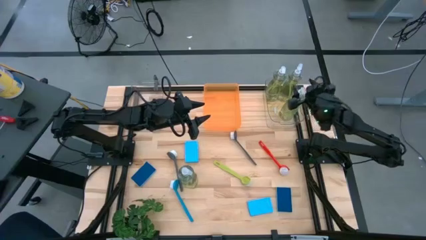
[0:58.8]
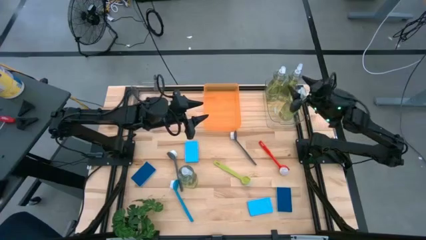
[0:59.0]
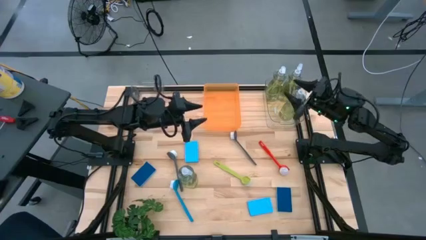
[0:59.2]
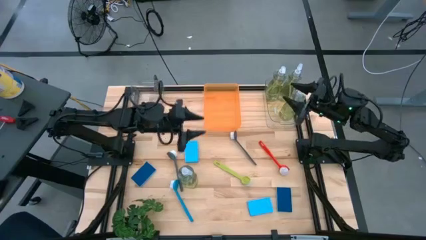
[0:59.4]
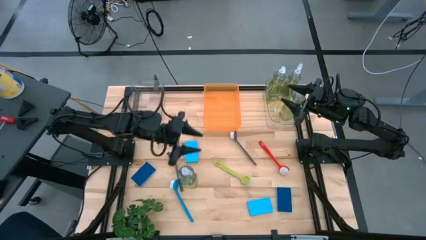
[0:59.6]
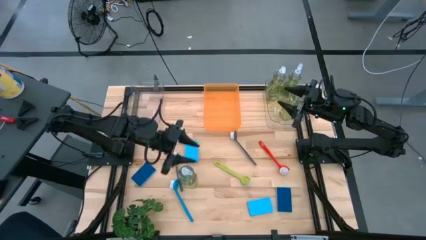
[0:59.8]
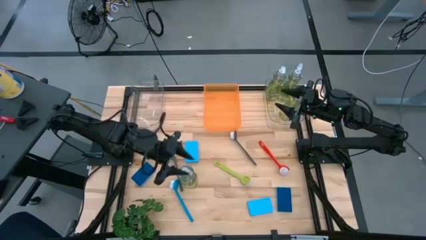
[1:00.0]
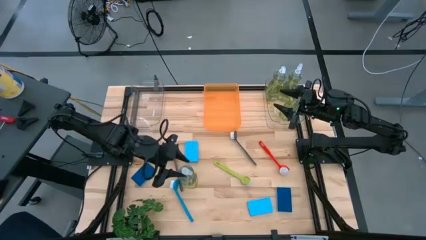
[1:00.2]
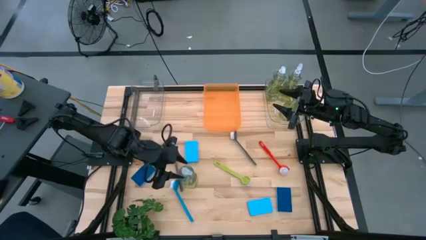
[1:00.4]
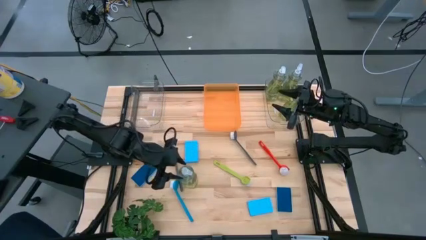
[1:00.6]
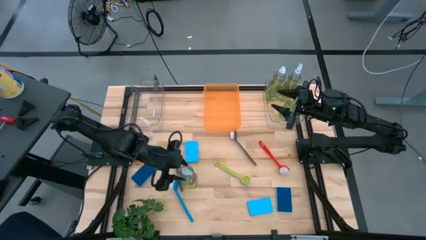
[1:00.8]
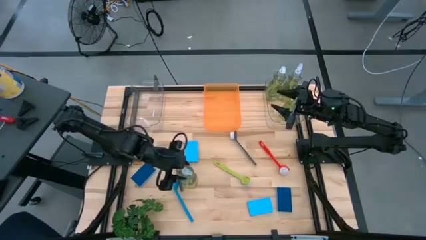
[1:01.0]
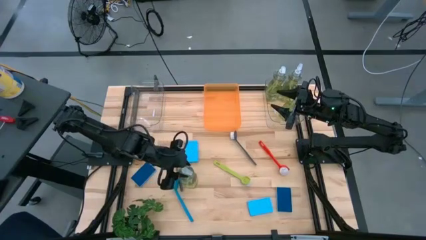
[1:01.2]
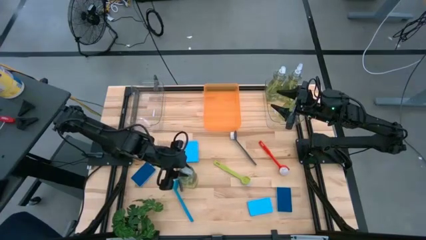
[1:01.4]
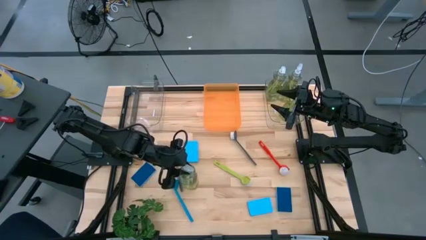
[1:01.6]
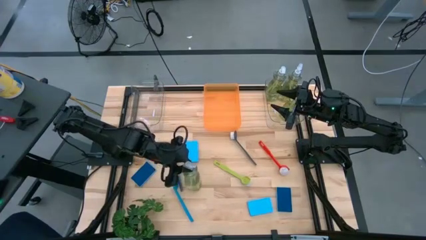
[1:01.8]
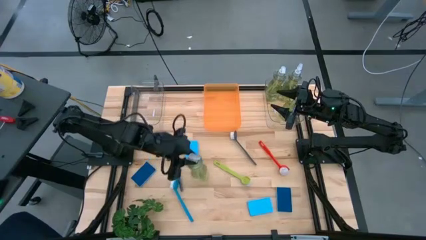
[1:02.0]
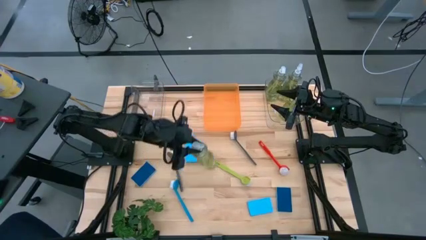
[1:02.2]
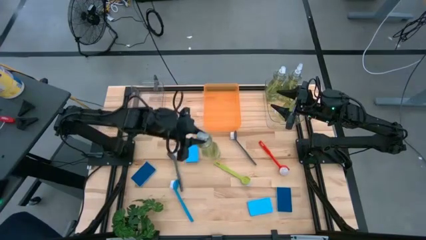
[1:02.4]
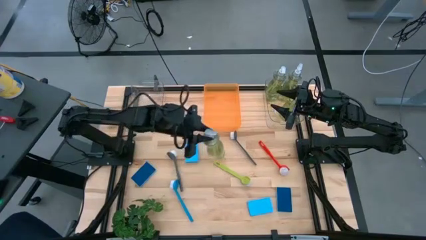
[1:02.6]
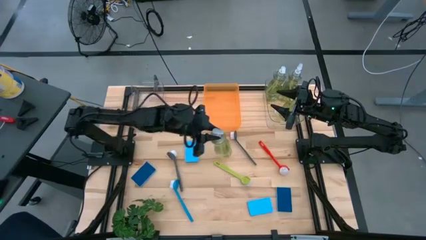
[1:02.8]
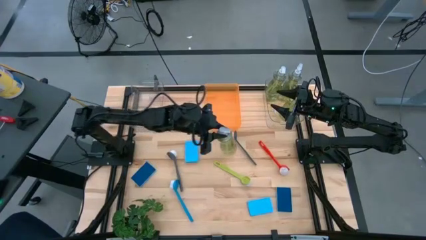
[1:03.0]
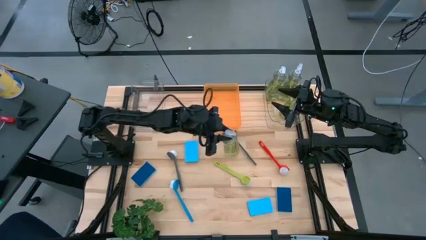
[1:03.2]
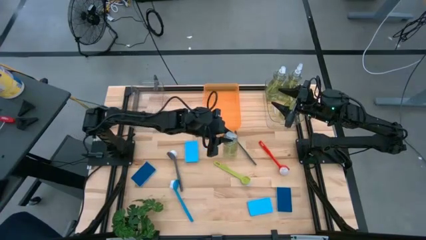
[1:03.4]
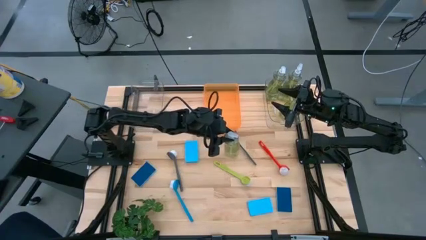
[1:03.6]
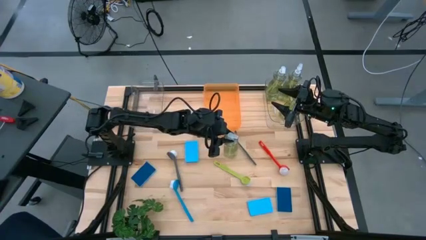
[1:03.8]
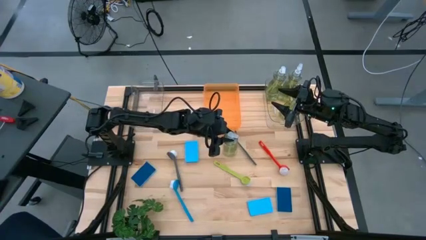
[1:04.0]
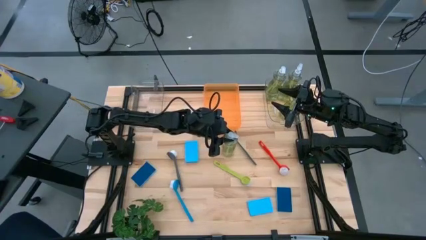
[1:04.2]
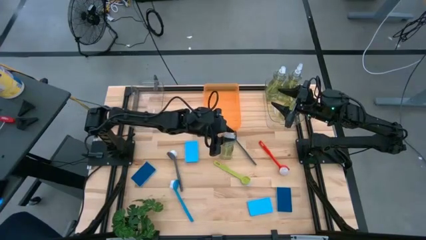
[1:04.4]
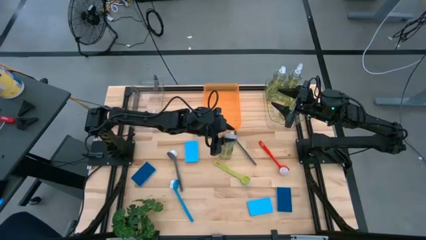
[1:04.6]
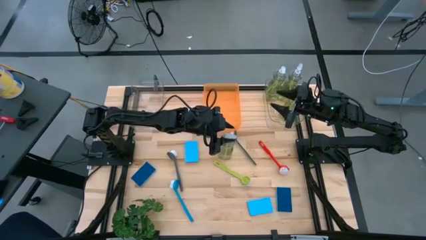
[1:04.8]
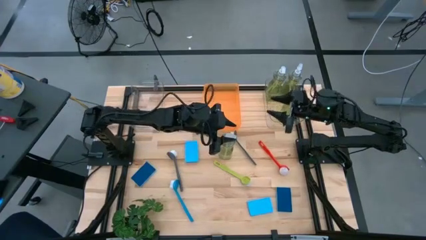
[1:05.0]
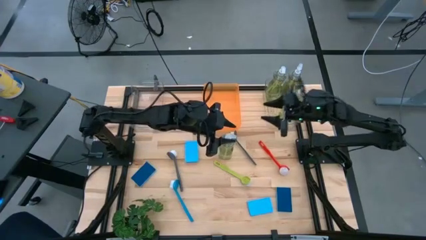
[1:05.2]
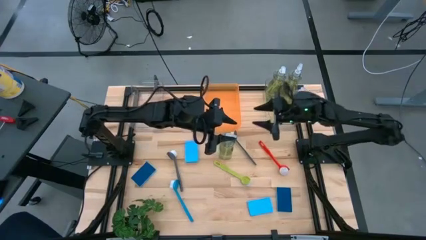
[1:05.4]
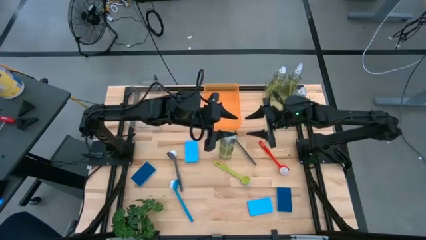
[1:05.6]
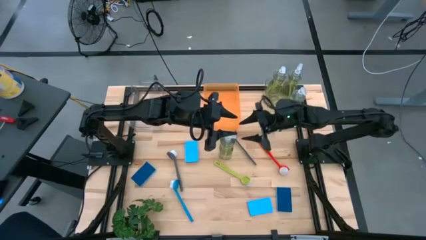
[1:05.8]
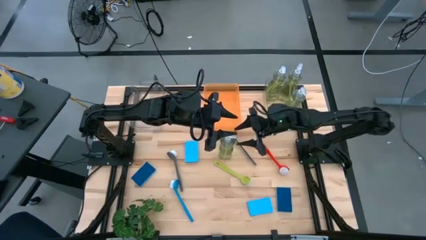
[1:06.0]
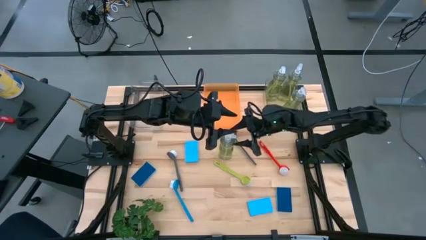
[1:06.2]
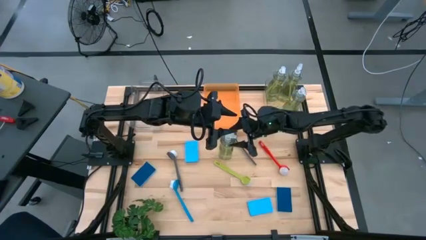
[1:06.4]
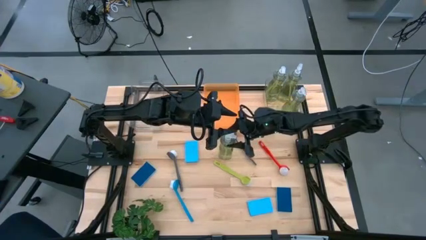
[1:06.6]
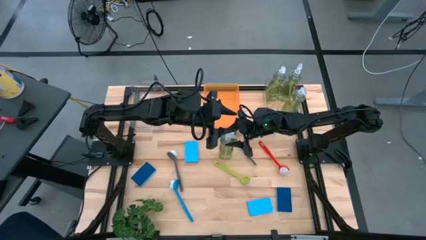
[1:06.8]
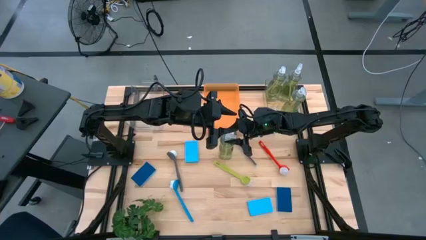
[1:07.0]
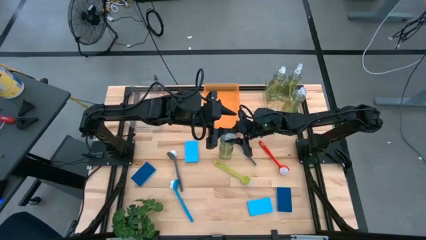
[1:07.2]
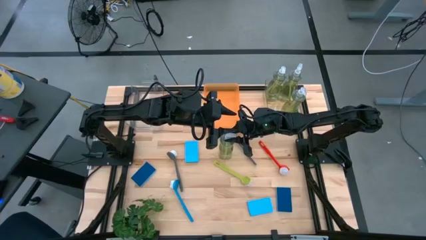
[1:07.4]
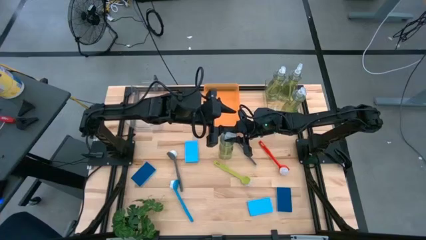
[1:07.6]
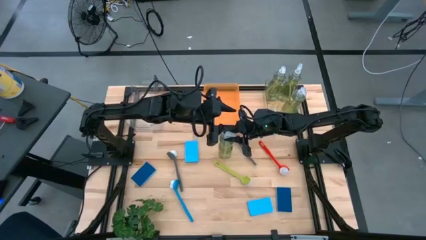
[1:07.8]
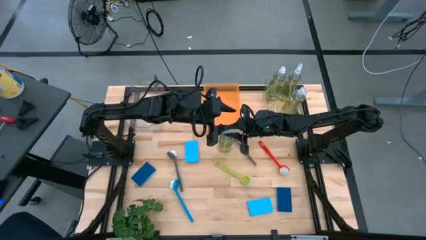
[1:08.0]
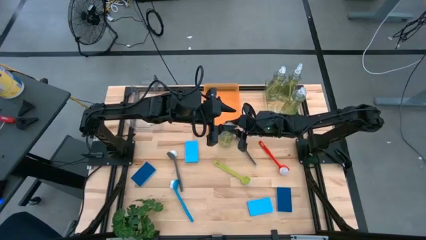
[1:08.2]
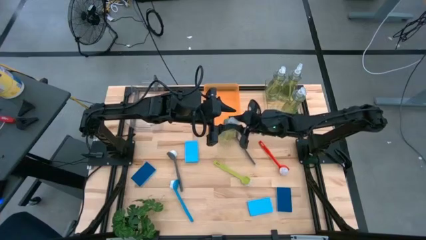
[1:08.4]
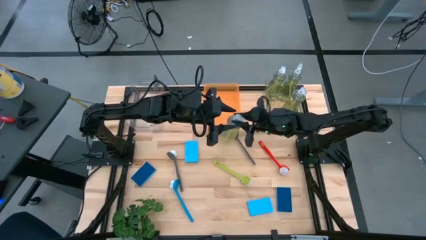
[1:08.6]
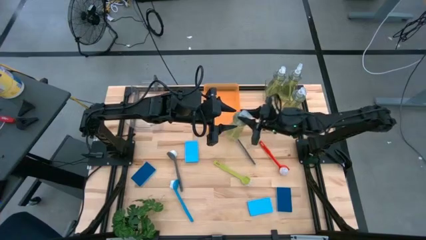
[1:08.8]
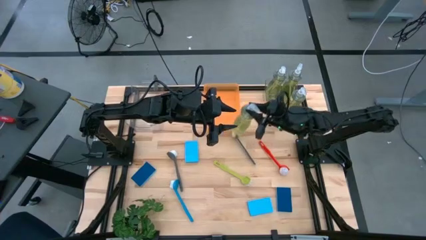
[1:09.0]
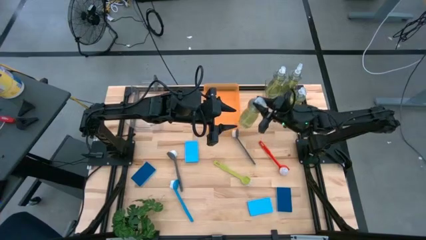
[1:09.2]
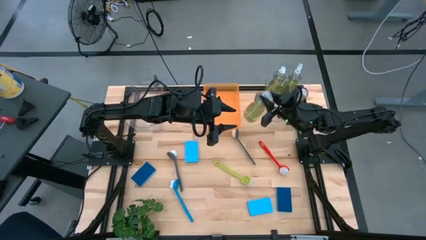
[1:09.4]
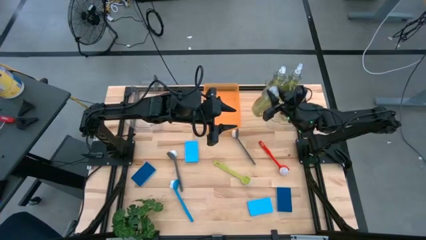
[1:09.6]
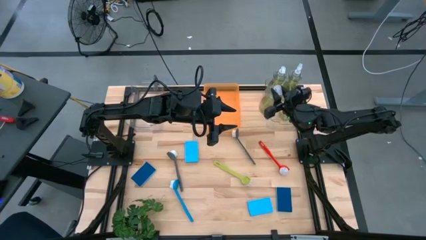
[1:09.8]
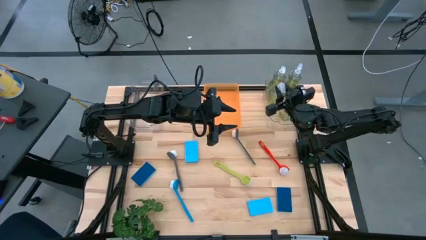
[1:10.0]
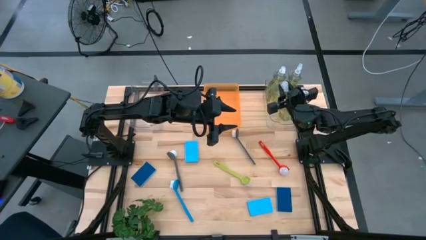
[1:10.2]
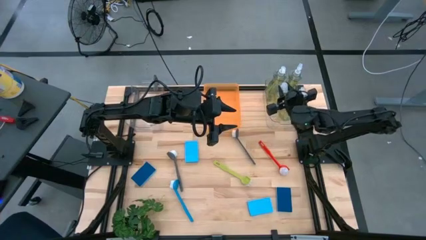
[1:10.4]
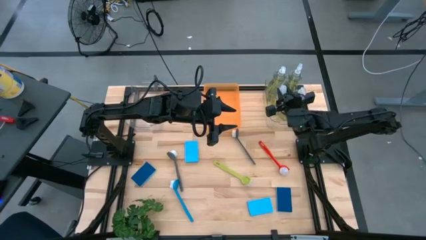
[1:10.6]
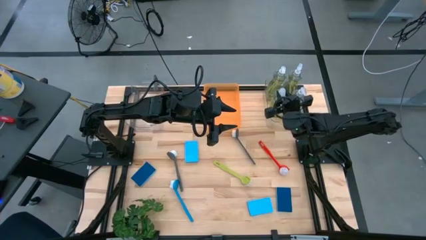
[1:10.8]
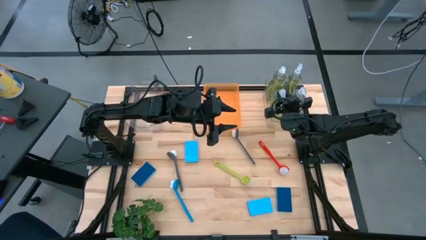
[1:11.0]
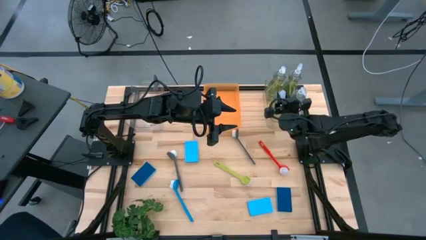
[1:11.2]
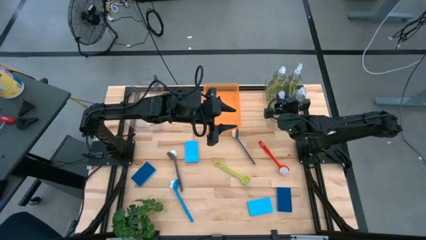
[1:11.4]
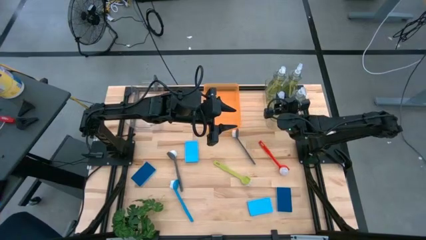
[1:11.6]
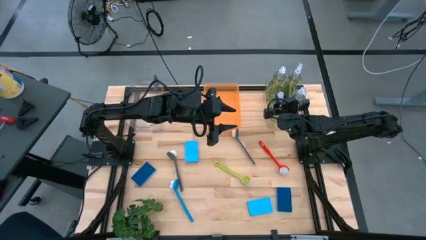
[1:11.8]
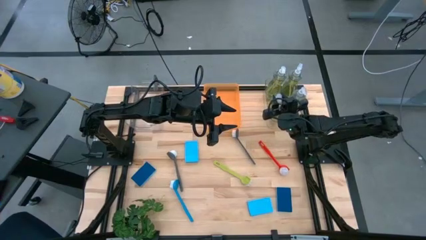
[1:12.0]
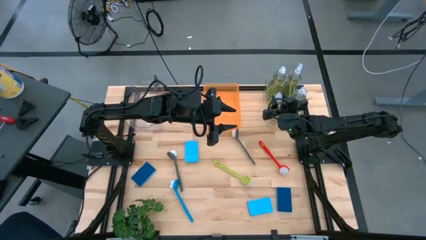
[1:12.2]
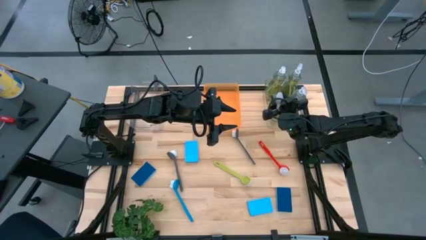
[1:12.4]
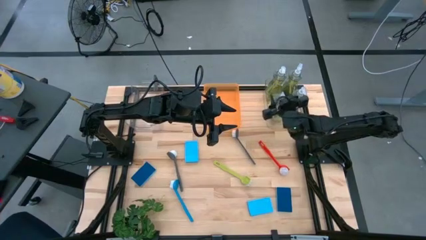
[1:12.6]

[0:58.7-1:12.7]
Task: Pick & Place Kitchen Sink Supplies
Put the yellow dish soap into the right transparent bin

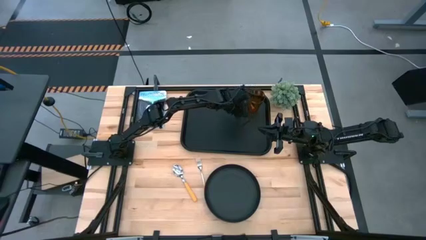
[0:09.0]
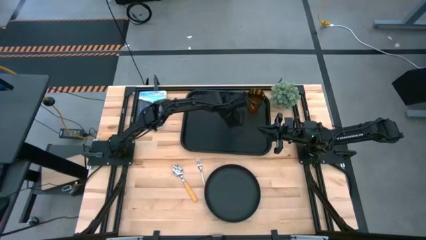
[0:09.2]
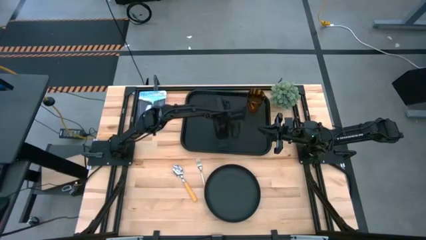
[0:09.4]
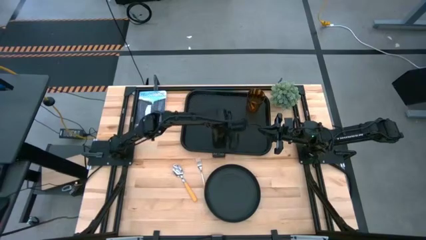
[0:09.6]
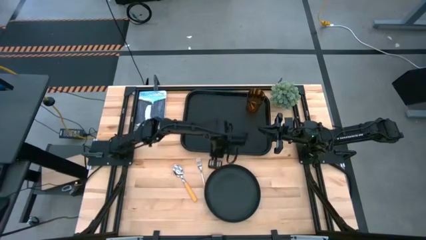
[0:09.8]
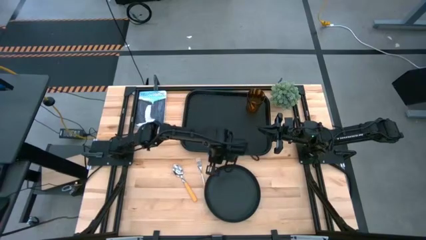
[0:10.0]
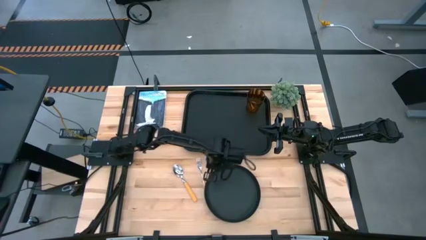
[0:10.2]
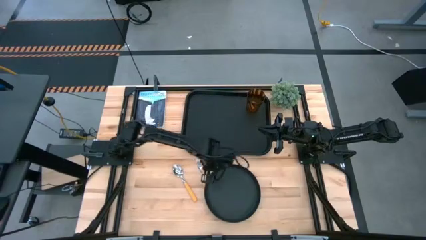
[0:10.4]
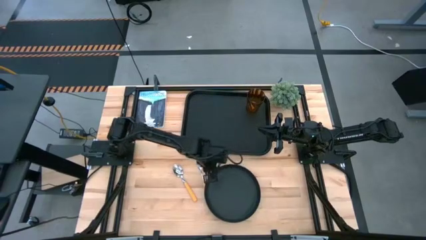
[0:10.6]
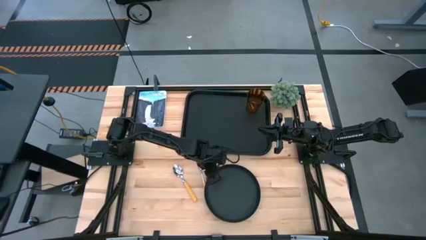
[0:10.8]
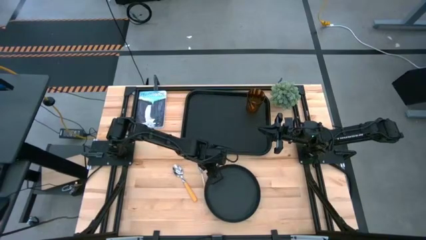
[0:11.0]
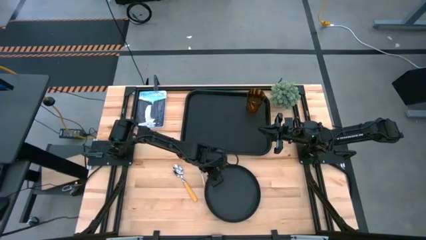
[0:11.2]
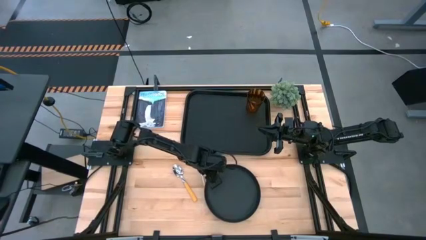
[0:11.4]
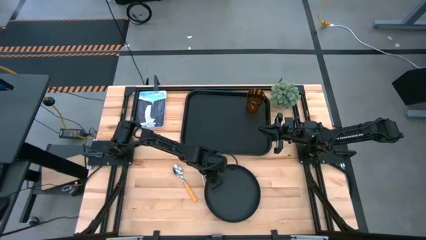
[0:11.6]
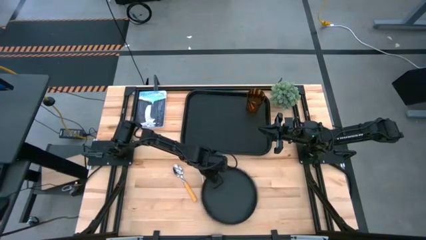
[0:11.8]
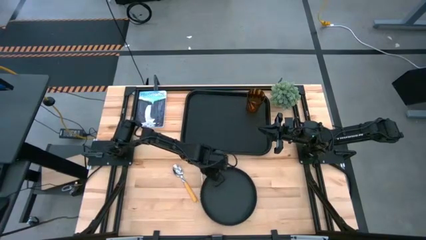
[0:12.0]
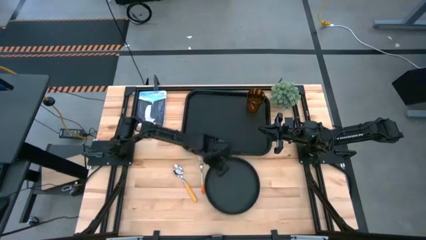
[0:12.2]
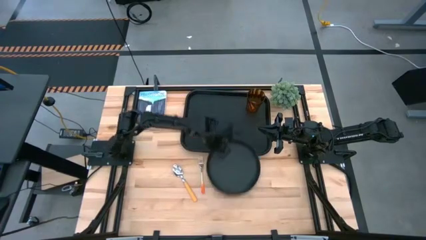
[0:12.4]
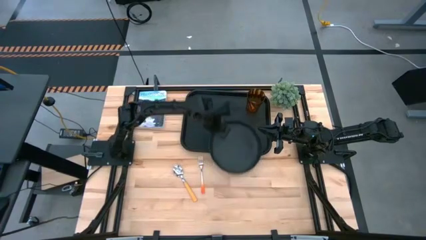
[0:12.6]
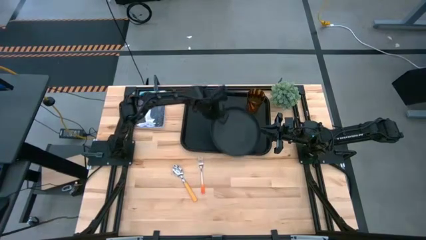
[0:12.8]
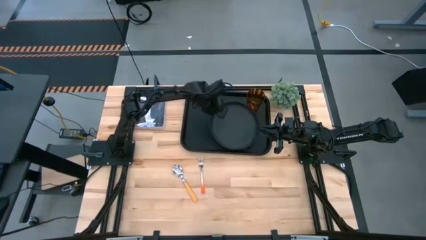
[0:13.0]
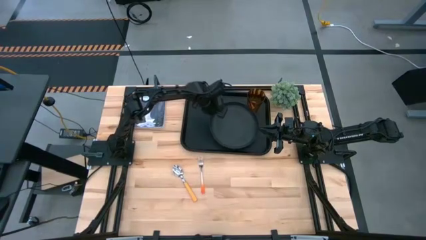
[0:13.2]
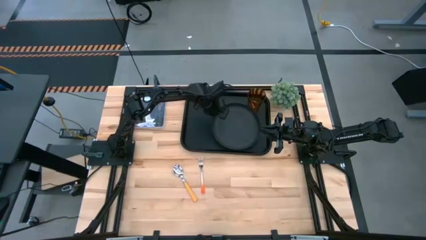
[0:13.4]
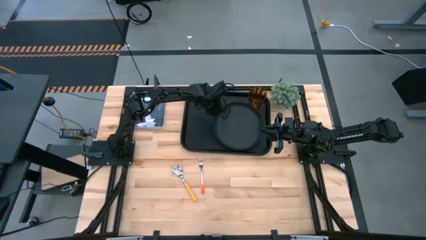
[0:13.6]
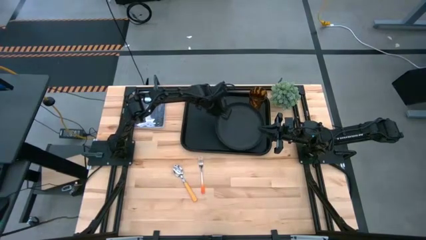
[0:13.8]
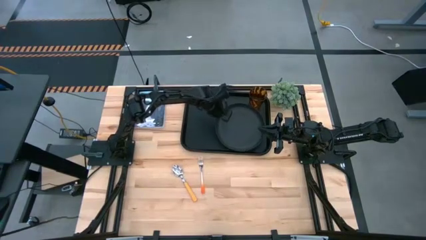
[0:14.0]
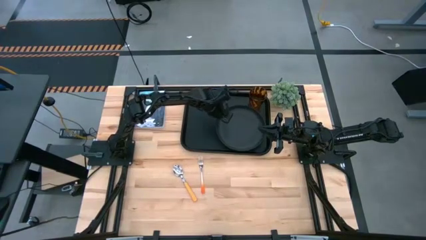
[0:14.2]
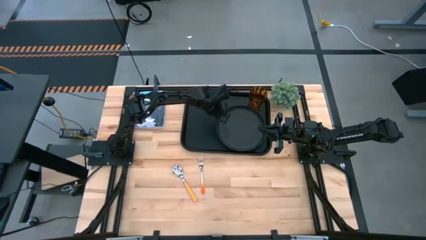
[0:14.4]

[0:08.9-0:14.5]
Task: Pick and place plate/cup/fork/spoon on tray
Put the black plate on the black tray to the bottom left of the brown cup
